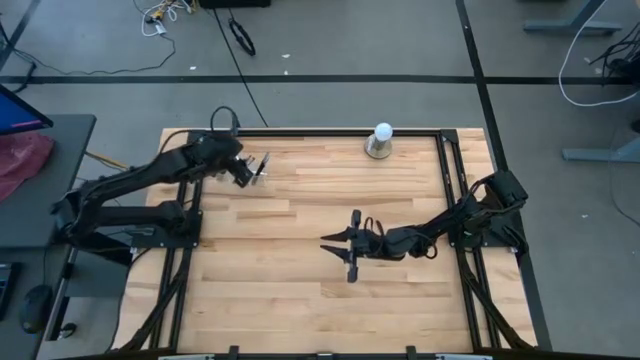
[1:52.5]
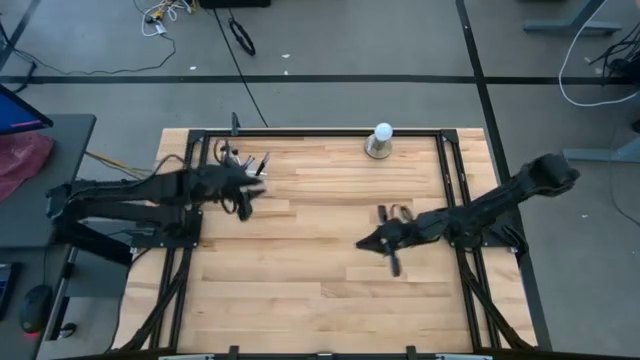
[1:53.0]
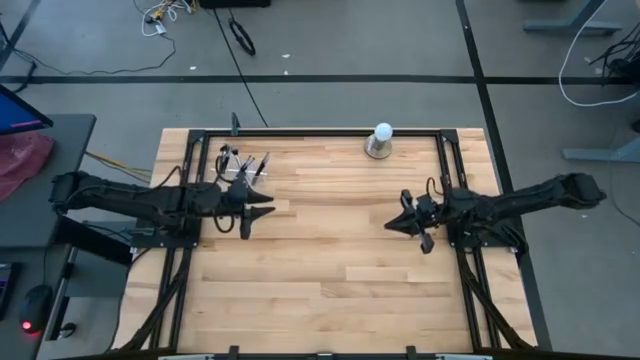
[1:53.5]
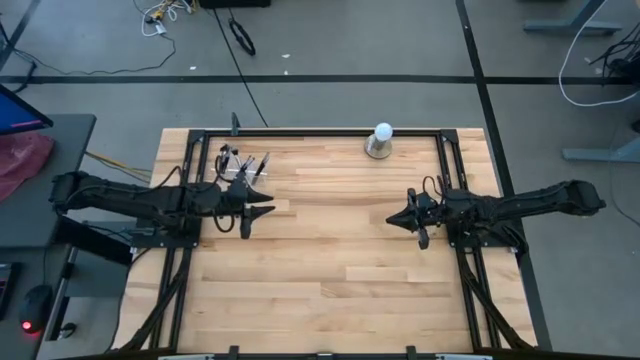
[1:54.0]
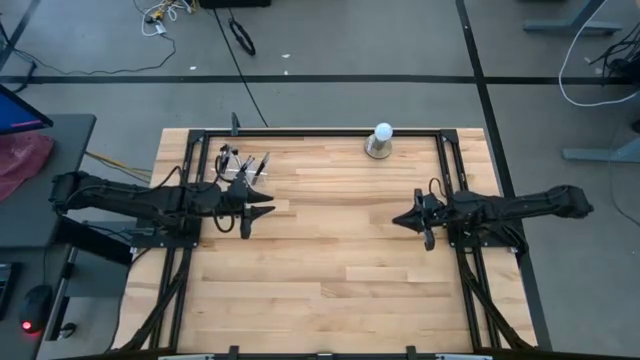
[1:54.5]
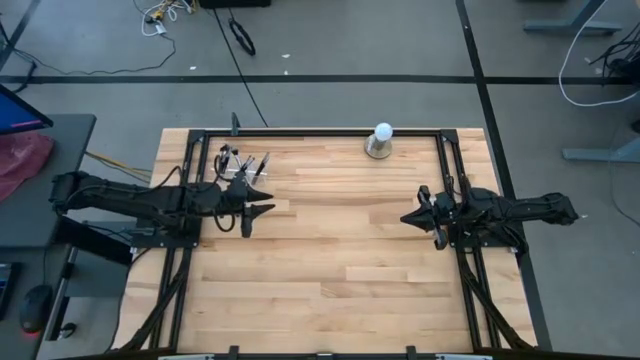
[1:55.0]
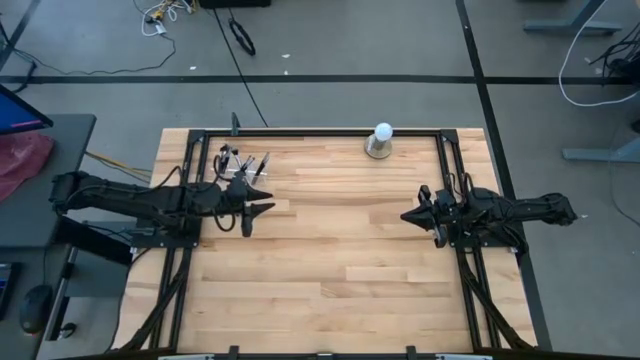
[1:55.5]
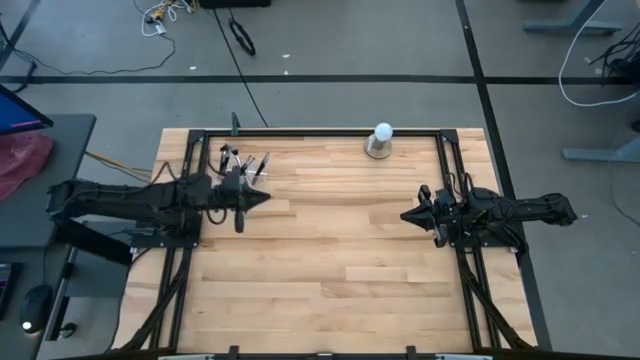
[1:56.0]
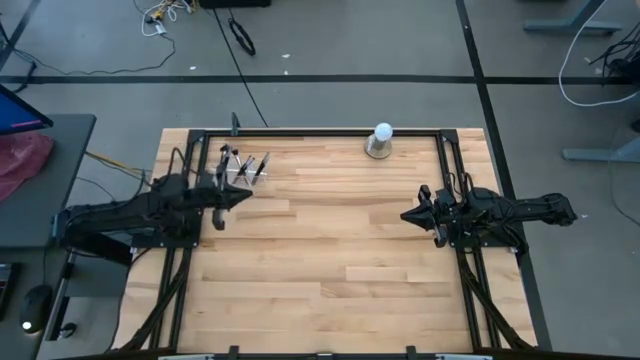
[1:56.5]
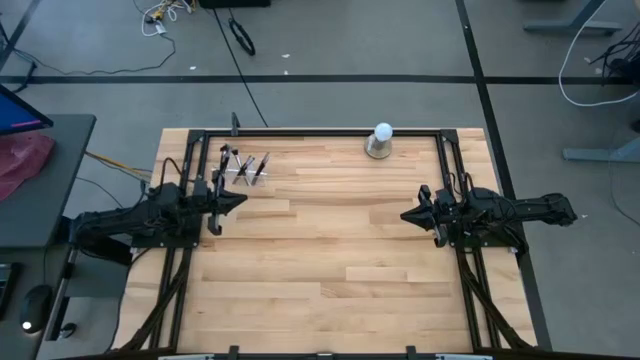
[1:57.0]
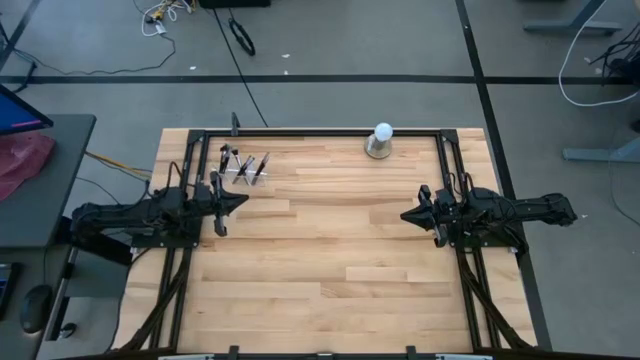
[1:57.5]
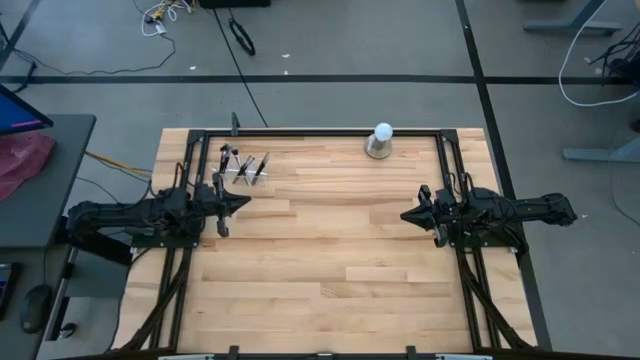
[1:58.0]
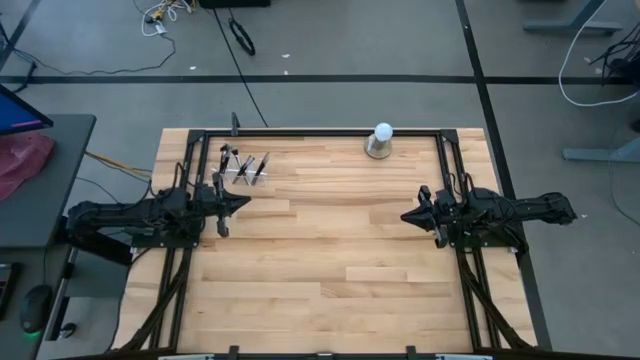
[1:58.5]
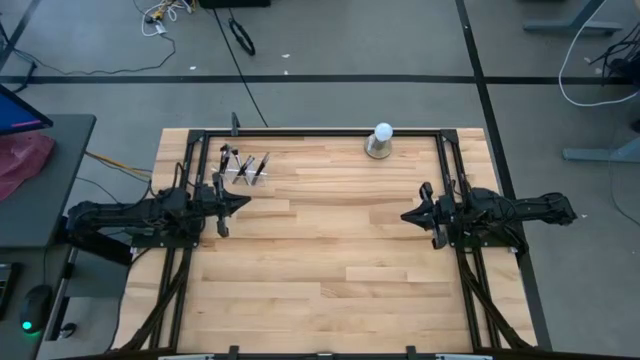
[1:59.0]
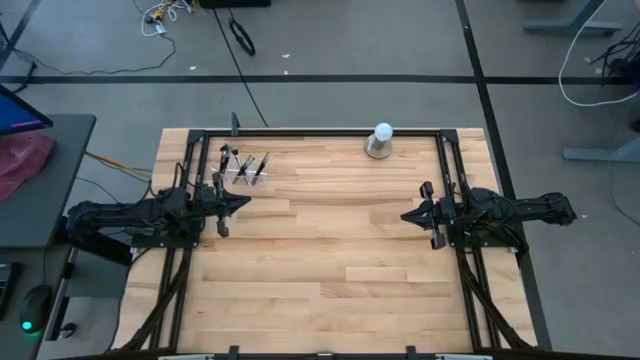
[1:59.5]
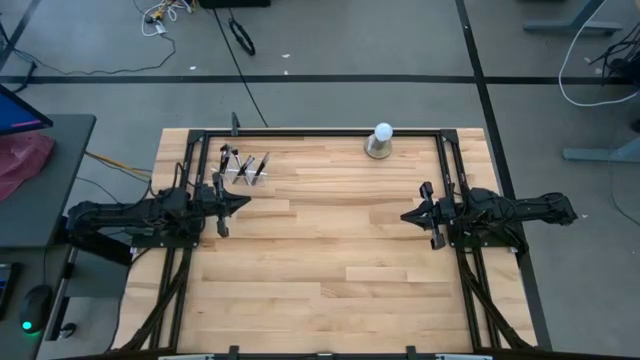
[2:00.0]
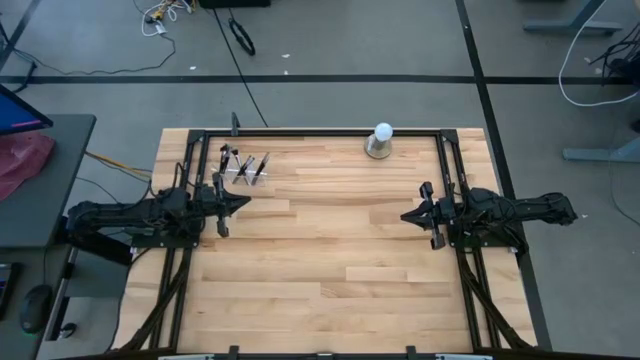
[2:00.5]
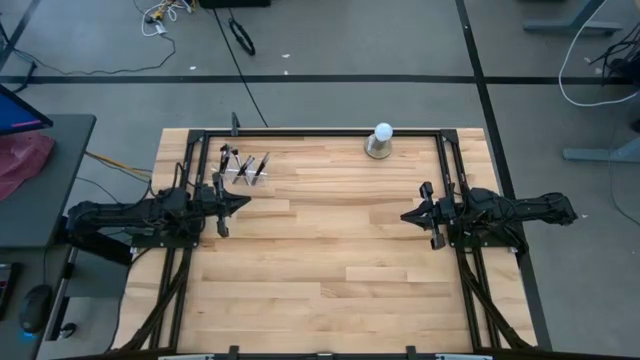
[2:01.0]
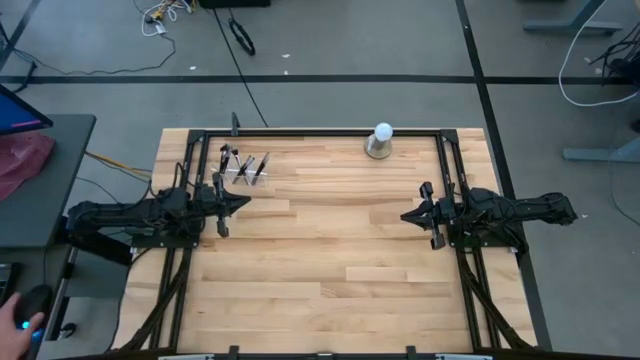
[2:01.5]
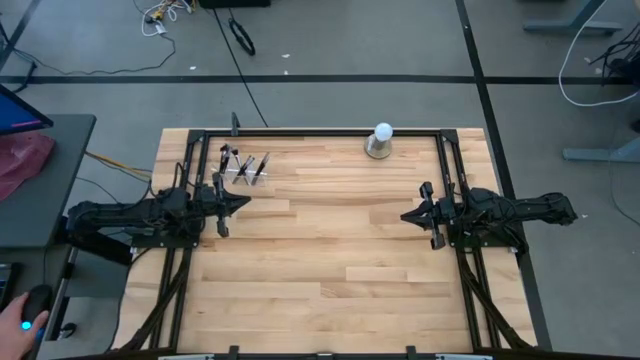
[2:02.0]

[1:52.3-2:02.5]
Task: Put items in baskets/containers
Return to Home Position

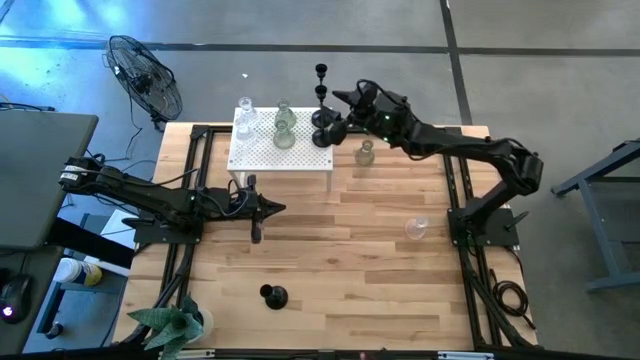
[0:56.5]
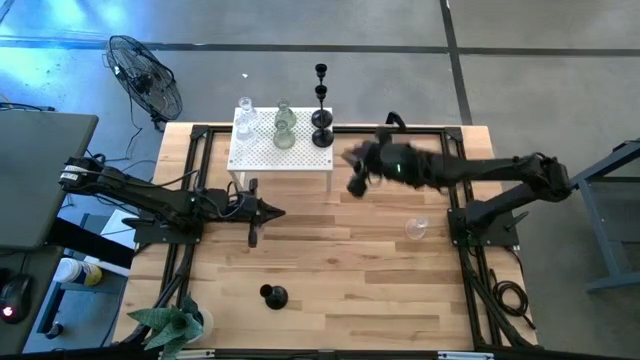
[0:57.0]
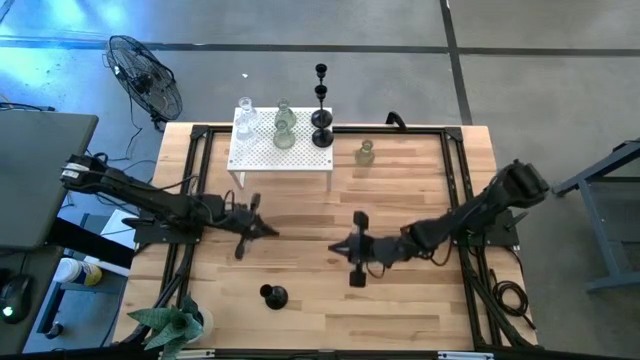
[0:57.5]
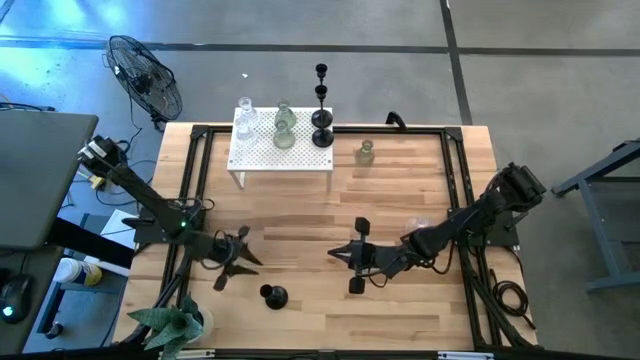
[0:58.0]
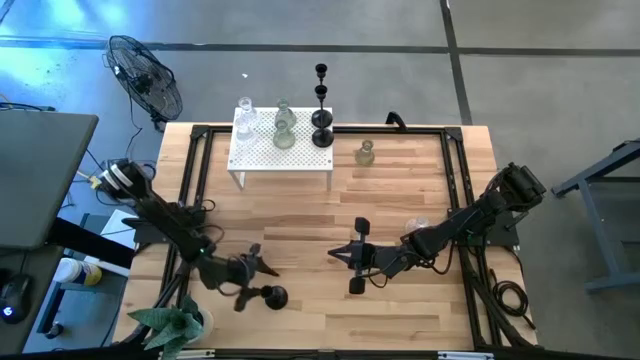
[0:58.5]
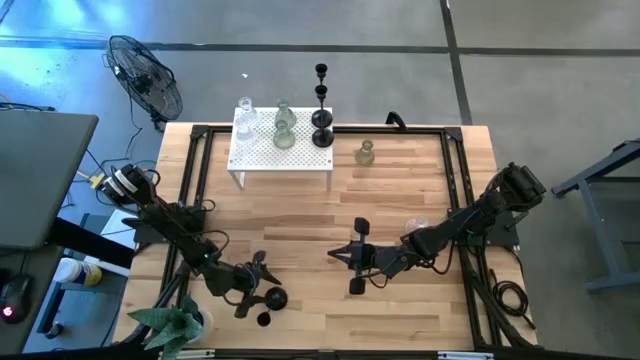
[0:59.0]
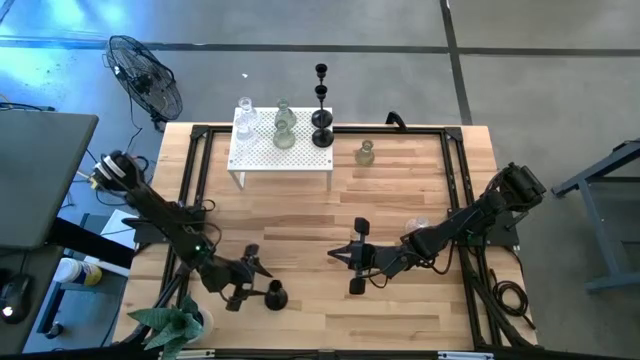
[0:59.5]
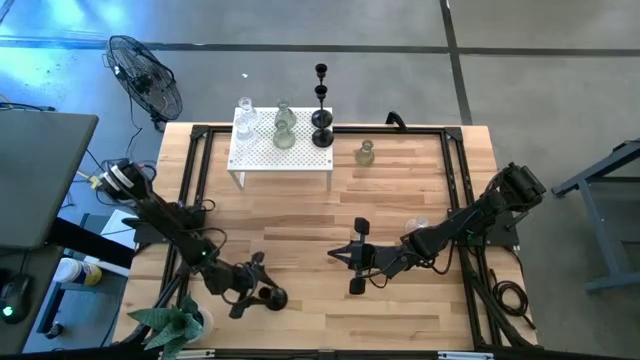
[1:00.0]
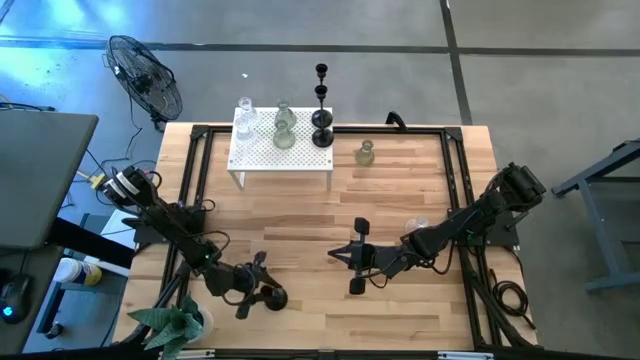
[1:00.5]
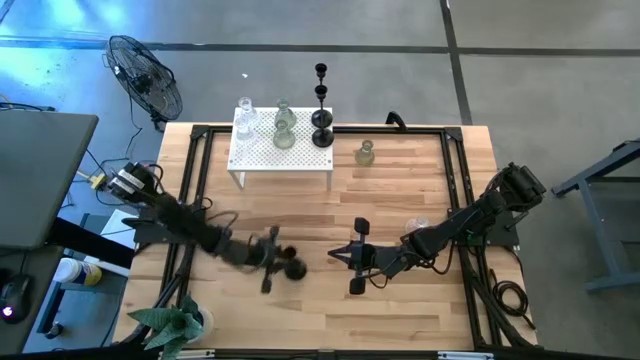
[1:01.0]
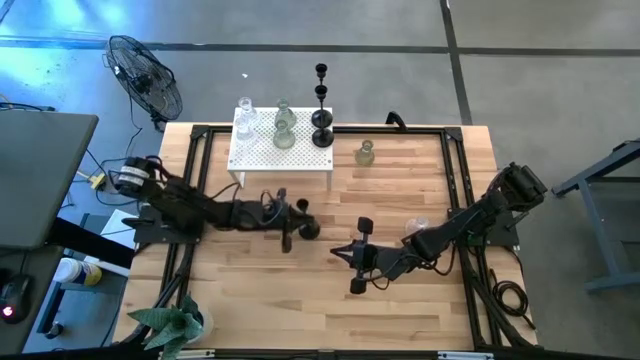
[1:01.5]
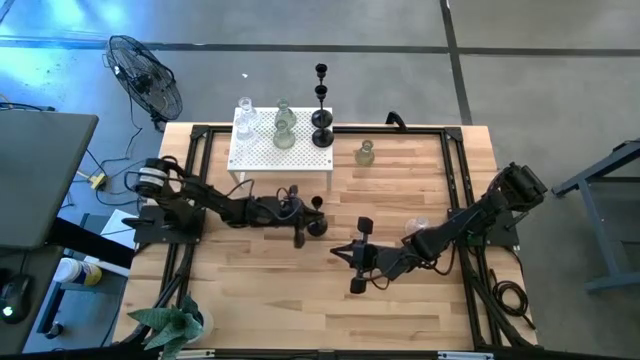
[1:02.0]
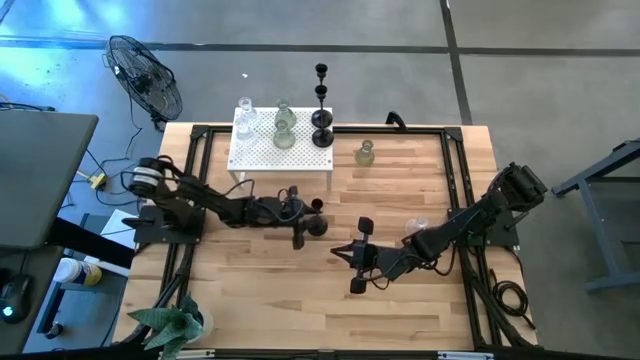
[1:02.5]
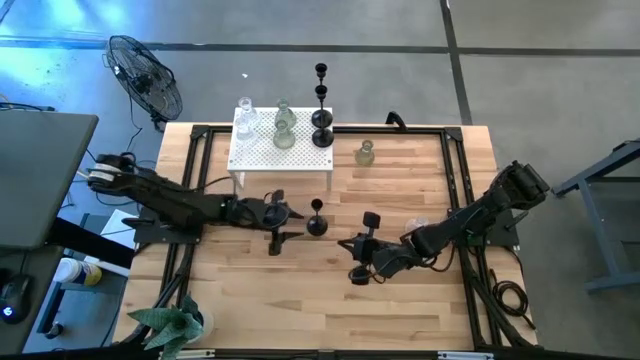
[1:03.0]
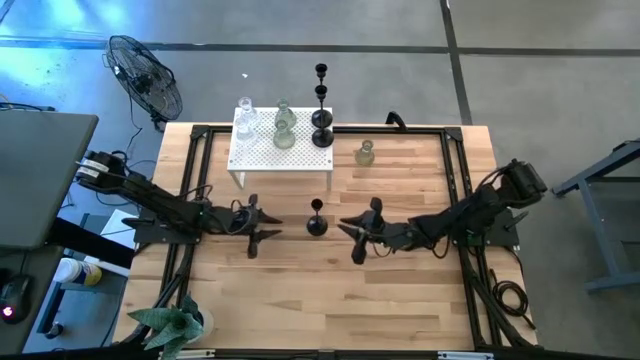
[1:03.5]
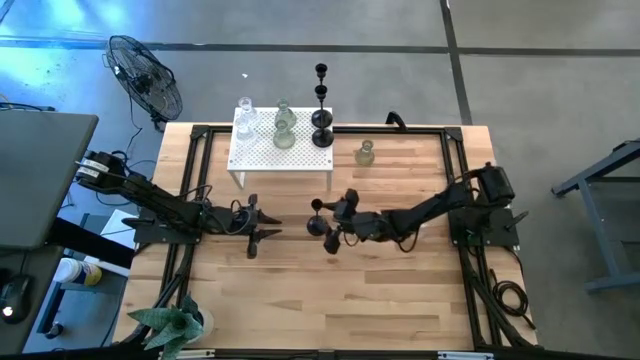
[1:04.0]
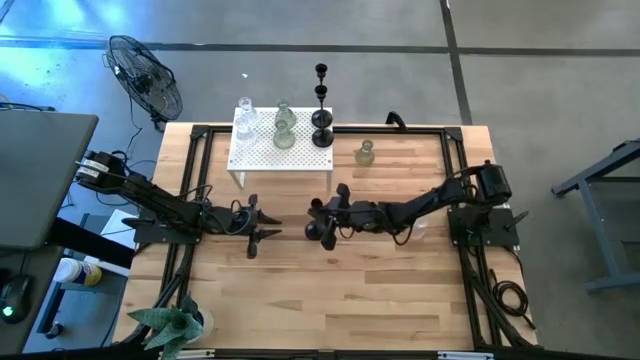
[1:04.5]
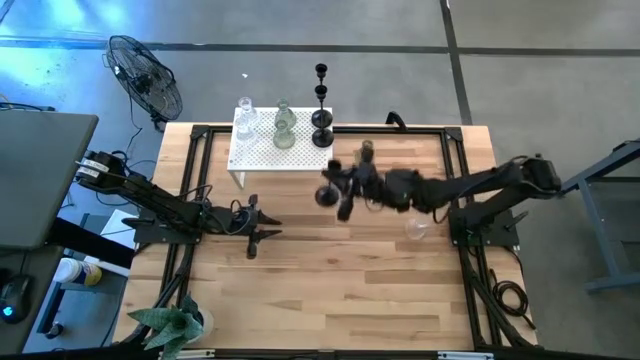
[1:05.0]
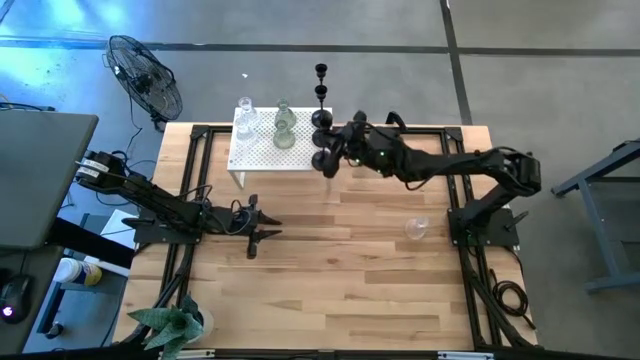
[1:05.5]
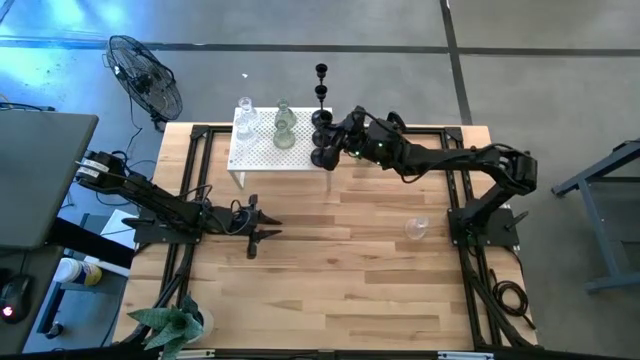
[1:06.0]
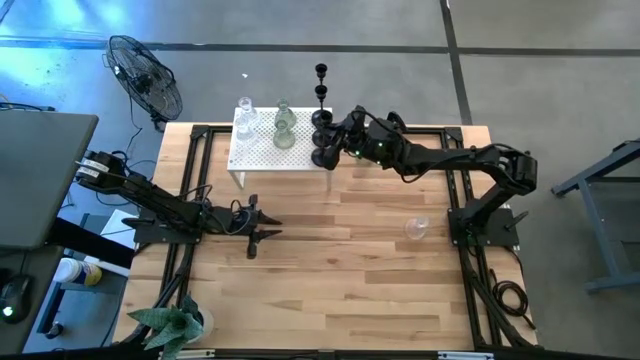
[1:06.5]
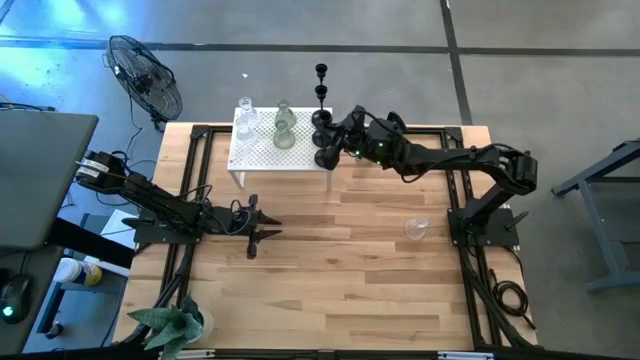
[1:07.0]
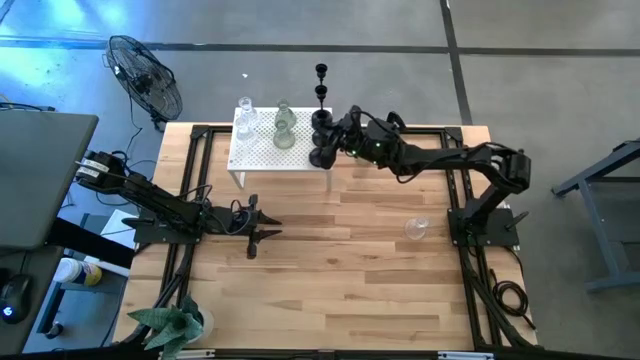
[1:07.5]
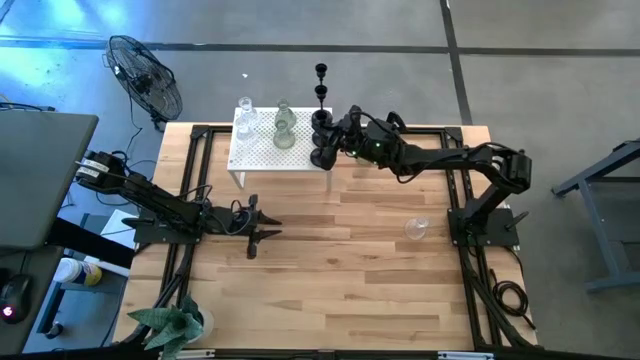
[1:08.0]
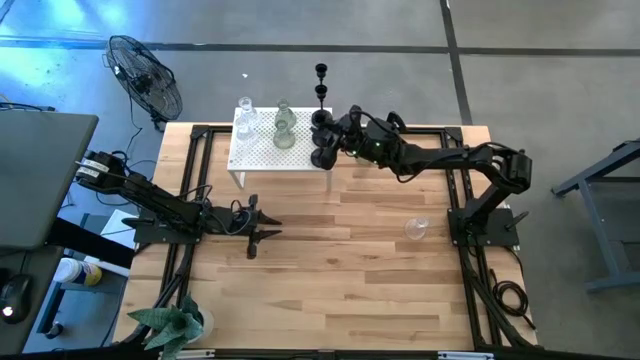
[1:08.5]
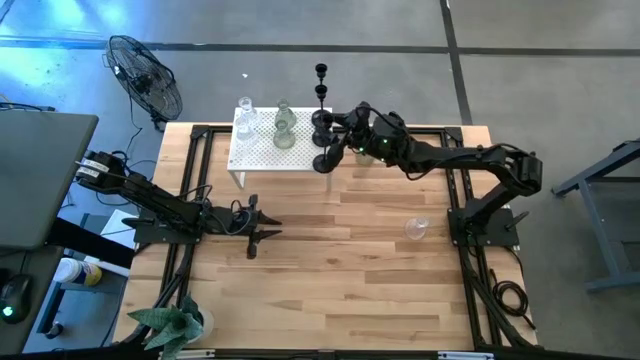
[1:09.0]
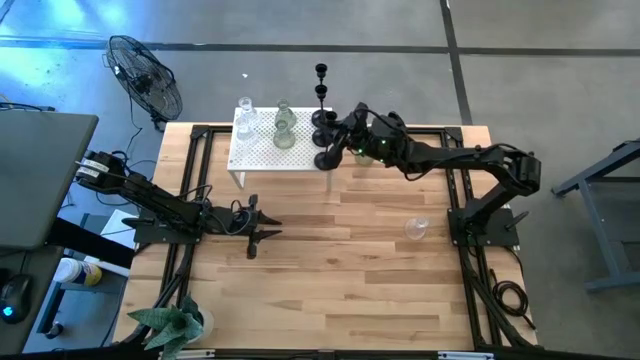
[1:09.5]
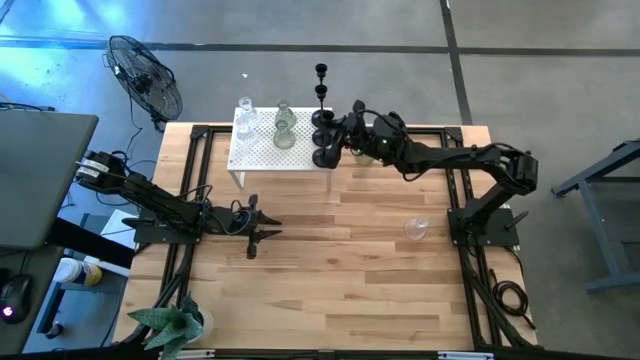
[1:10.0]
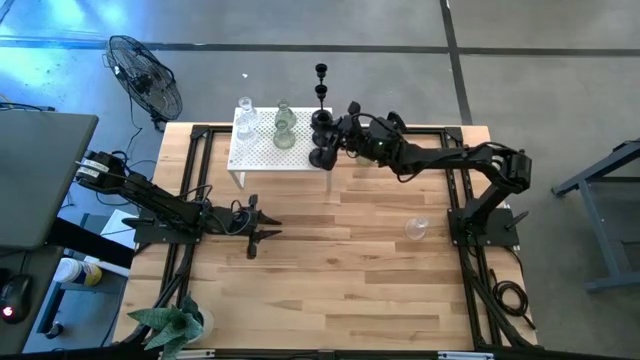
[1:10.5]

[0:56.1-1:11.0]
Task: Pick & Place candle stick holders
Align the black candle holder with the other black candle holder on the shelf
